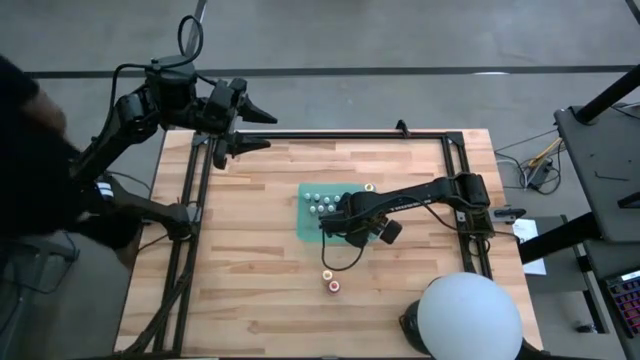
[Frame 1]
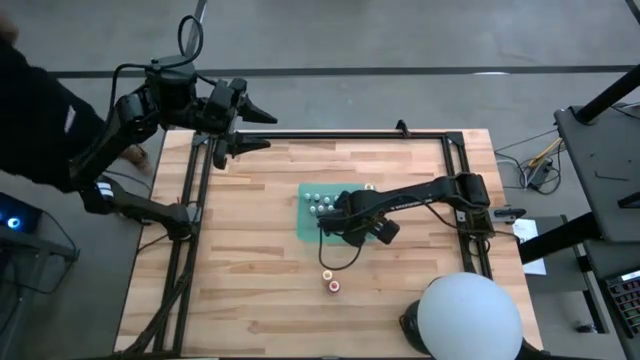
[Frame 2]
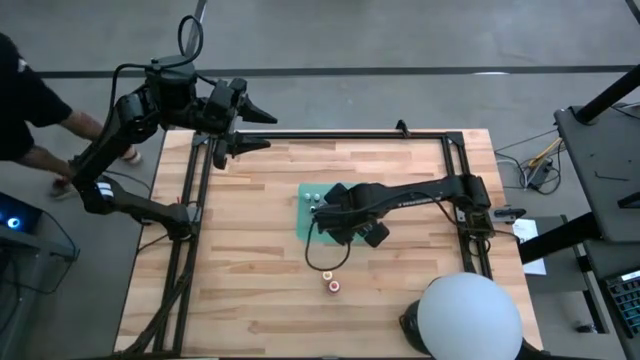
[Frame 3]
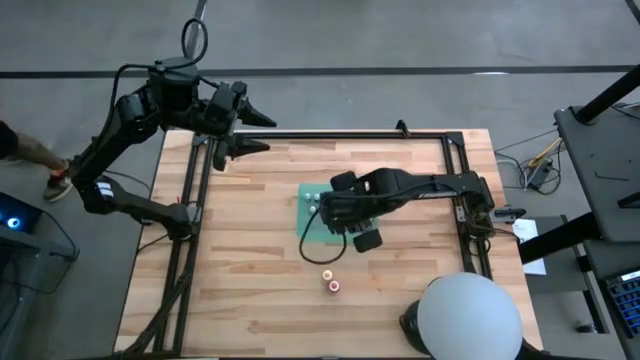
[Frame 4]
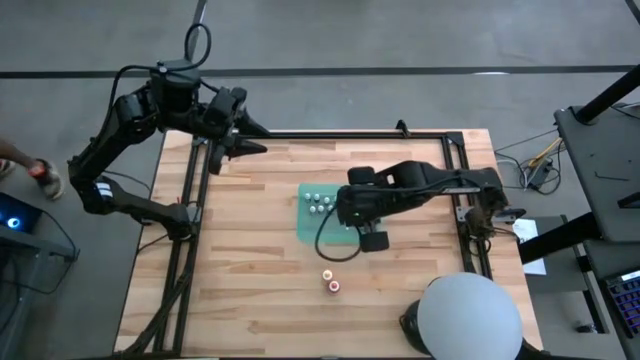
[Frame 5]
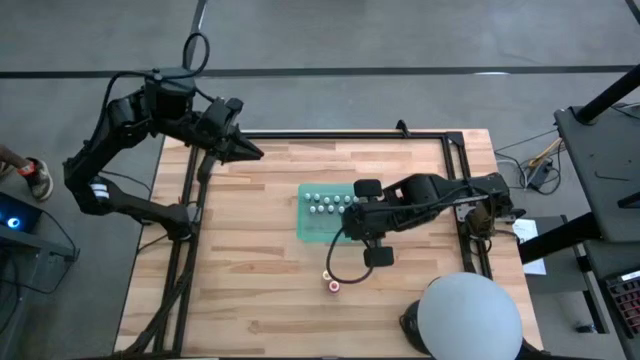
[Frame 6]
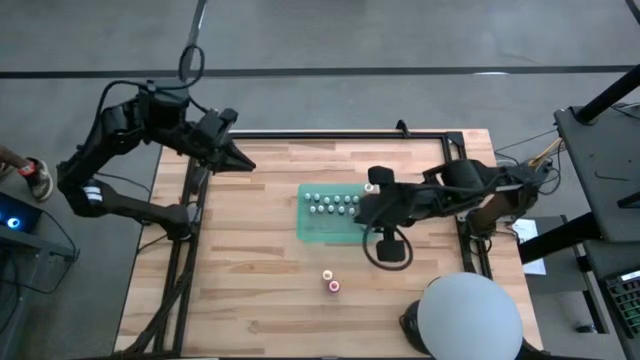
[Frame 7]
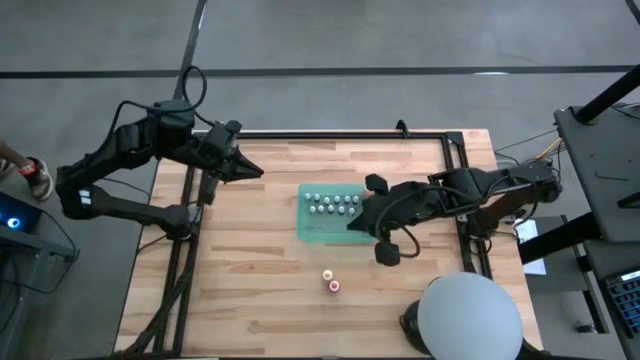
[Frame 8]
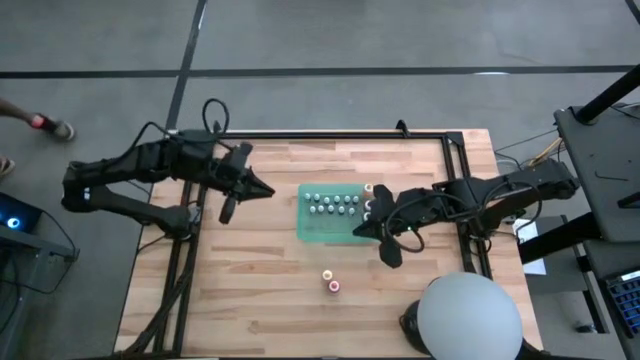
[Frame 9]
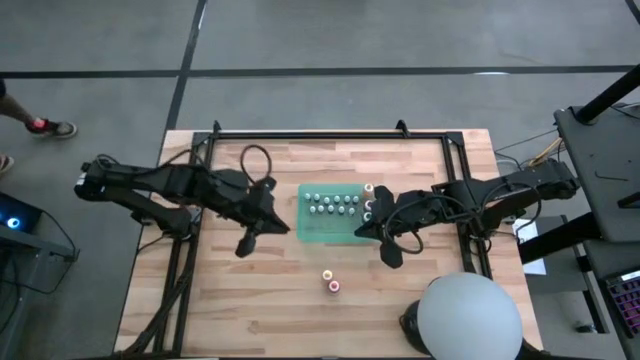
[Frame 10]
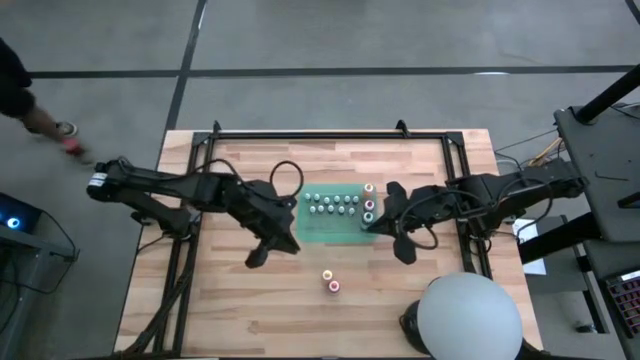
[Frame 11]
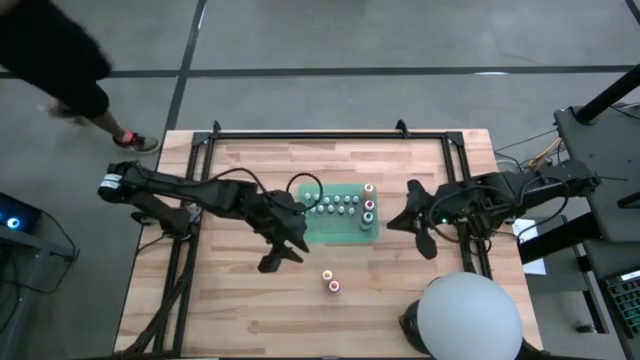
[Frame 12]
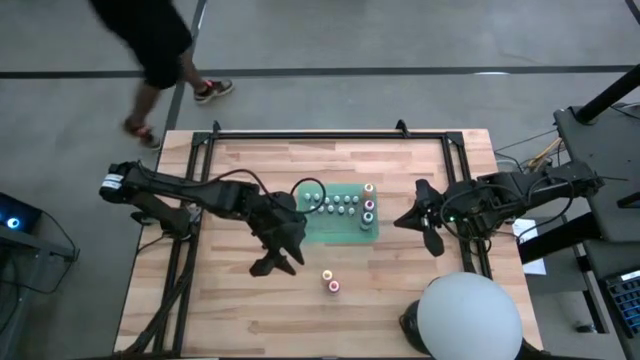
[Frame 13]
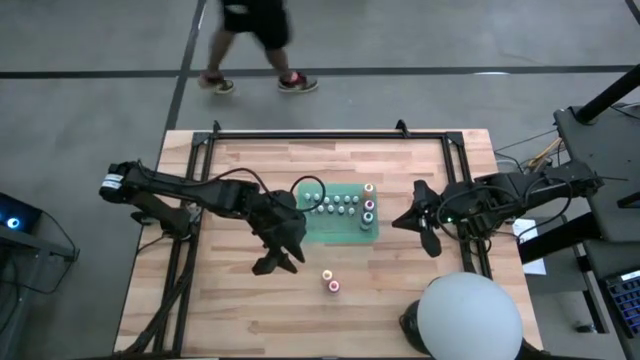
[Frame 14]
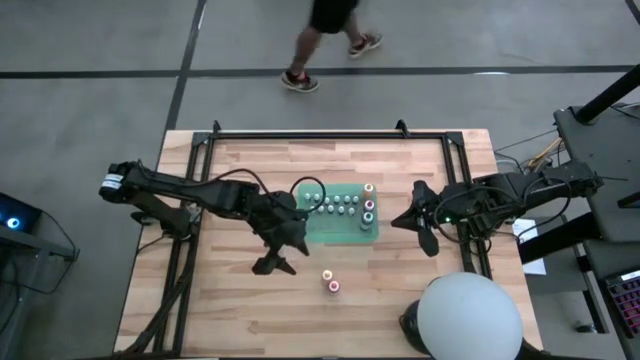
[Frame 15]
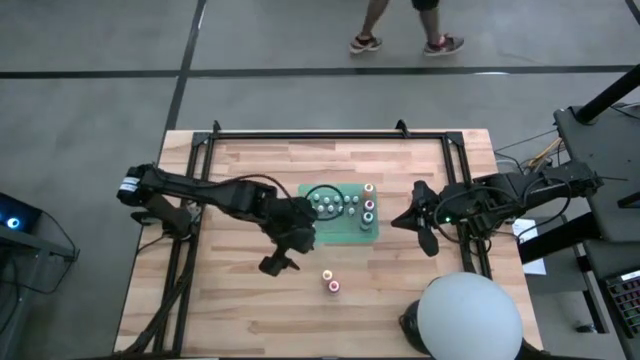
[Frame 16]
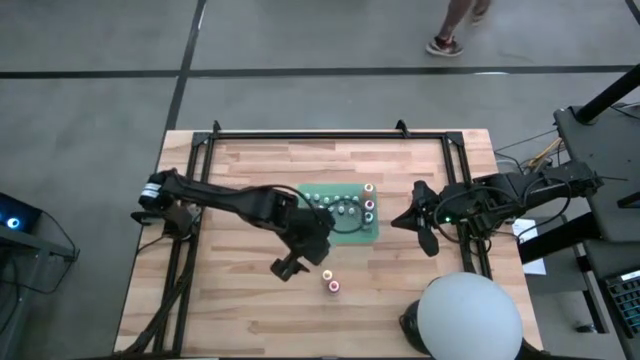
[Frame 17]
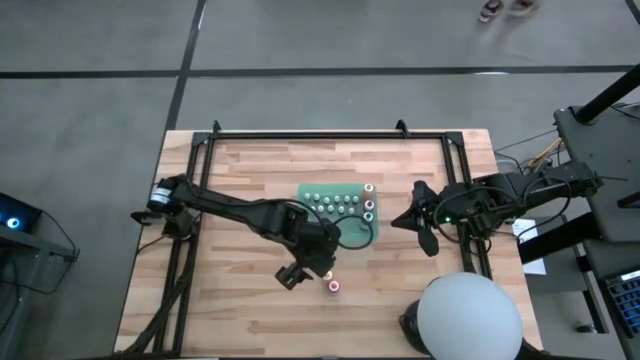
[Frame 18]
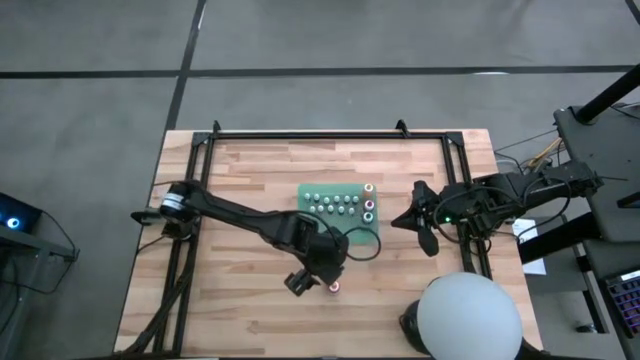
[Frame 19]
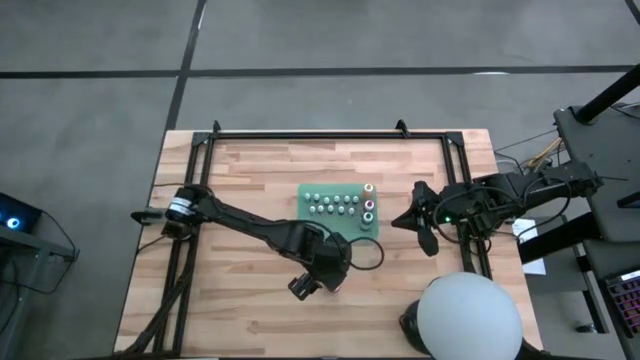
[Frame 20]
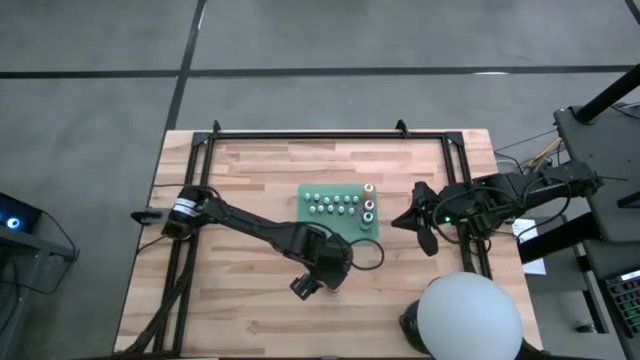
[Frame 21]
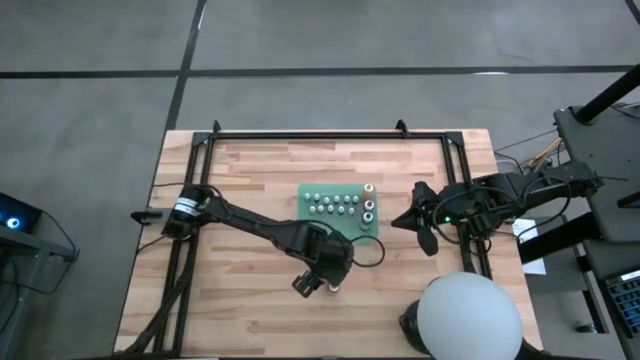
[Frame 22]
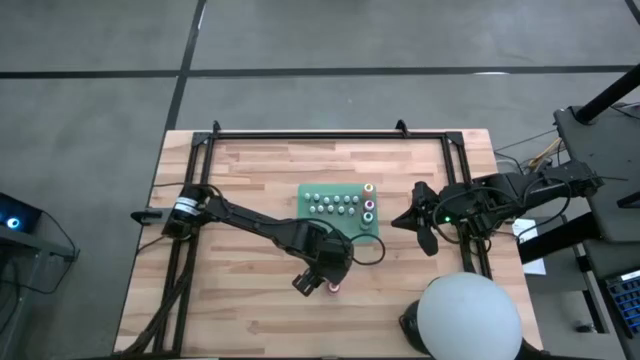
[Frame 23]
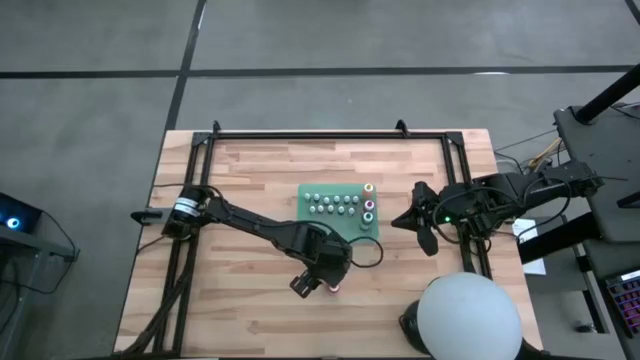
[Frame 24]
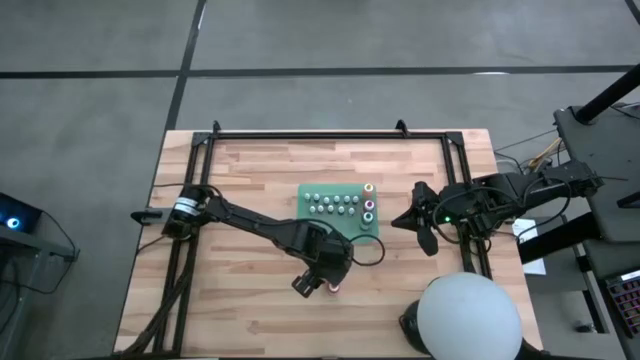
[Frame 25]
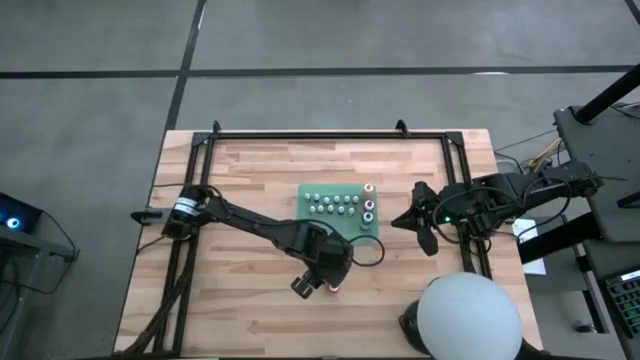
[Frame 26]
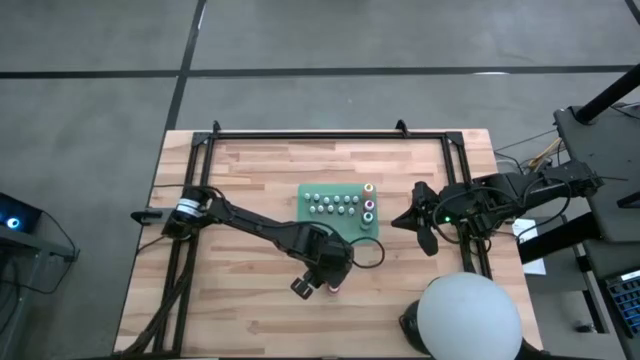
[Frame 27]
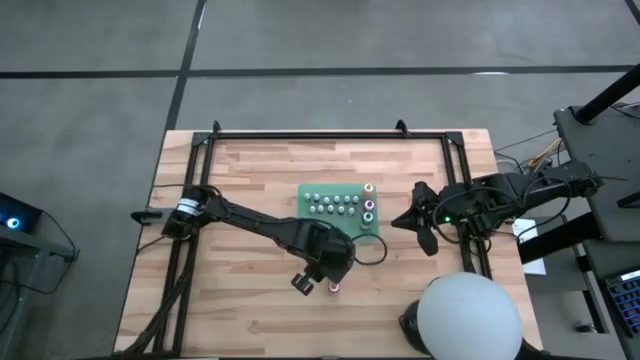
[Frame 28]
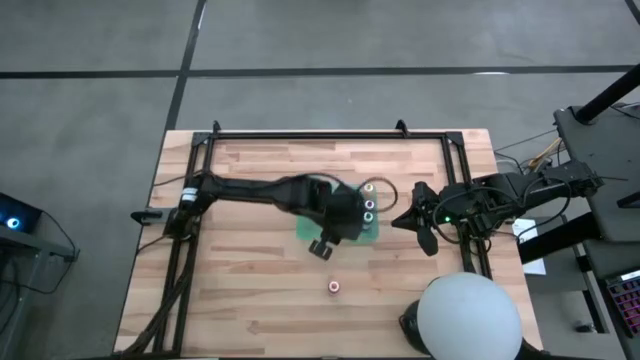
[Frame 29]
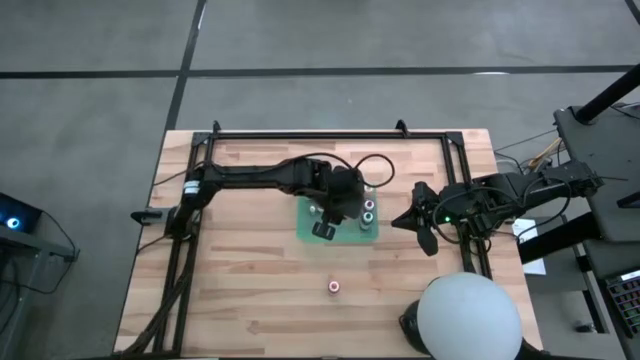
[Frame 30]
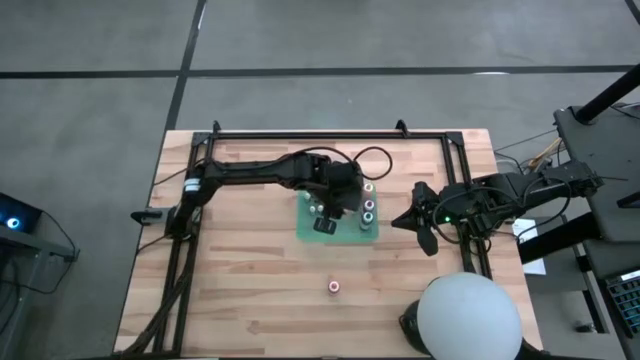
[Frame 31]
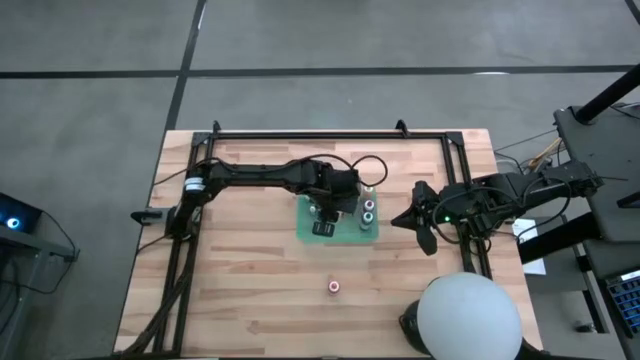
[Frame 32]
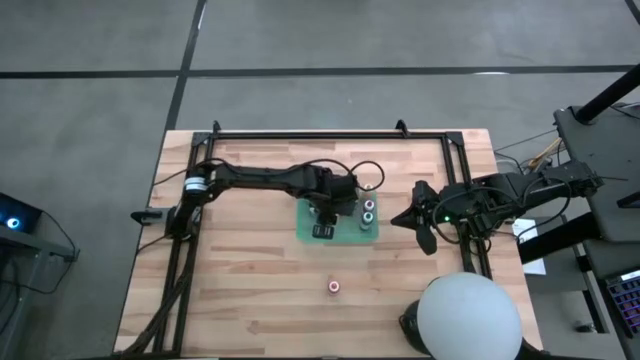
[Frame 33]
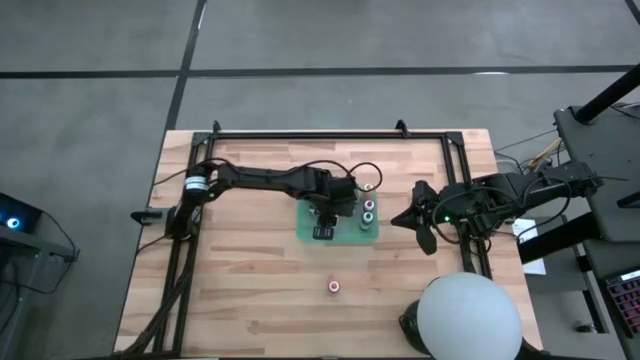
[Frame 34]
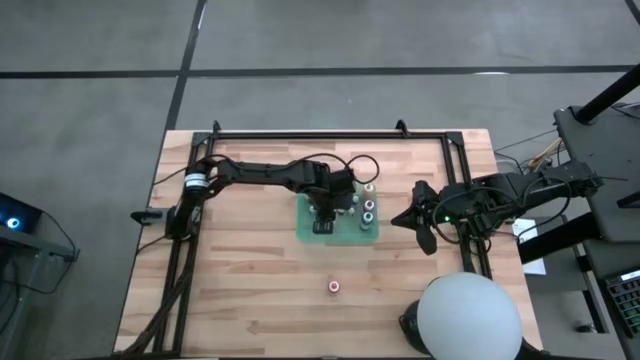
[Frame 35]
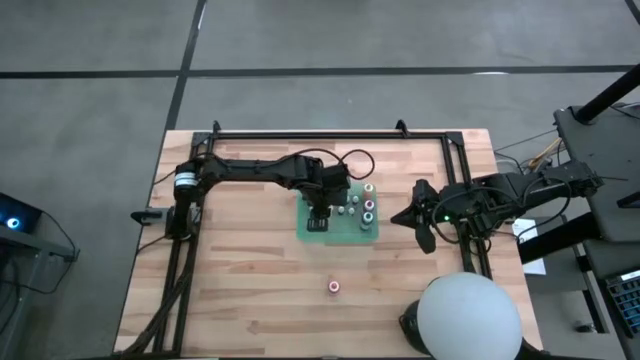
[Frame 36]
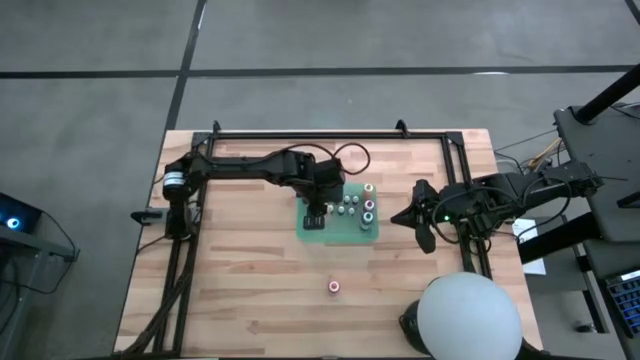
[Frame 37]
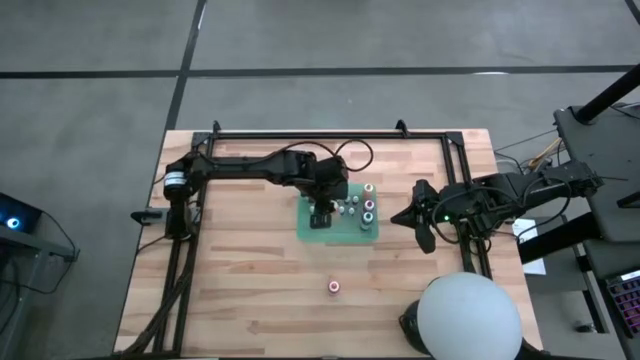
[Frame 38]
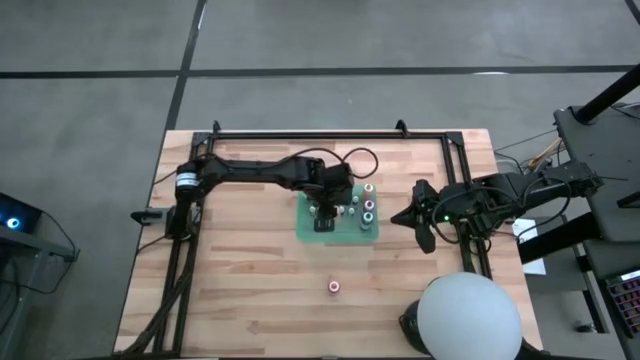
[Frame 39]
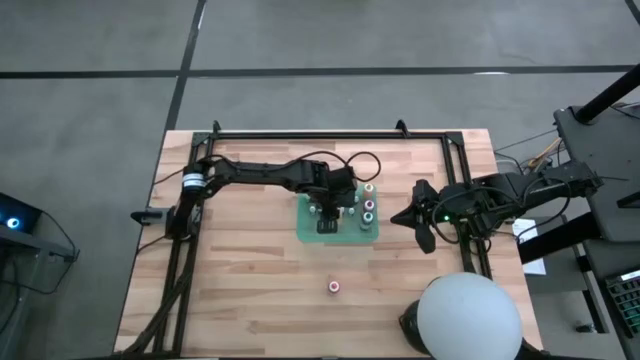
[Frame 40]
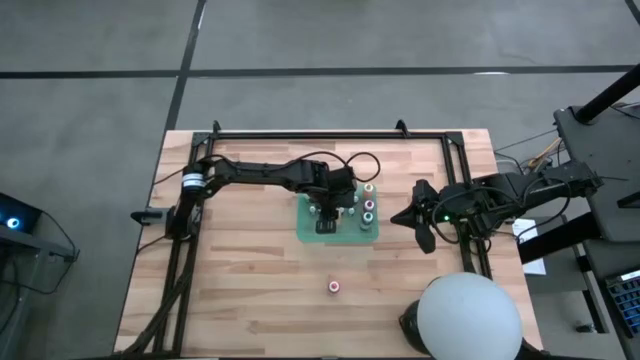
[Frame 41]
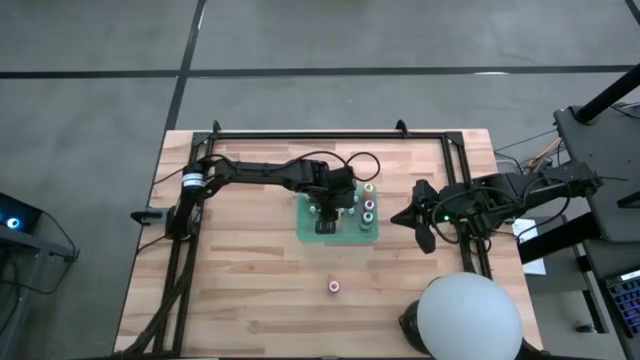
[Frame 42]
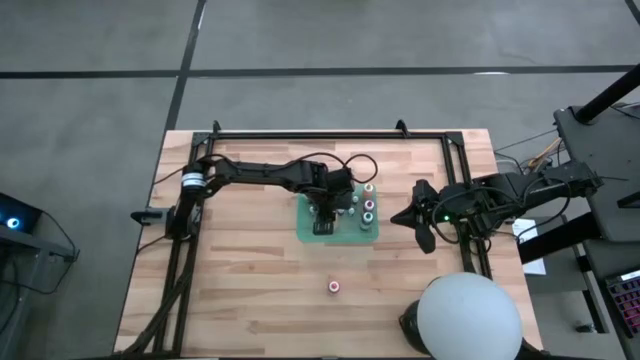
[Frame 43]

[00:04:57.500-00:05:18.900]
Task: Pick & Place food coloring
Put the big yellow food coloring bottle into the green container

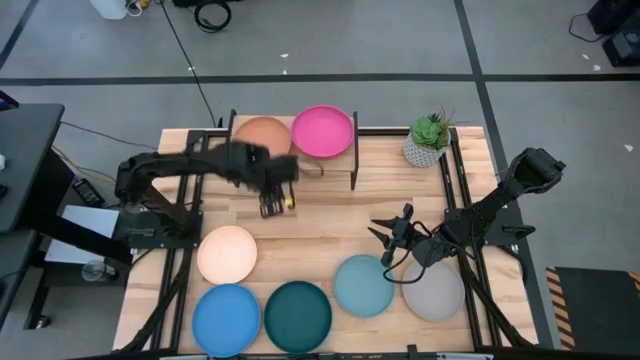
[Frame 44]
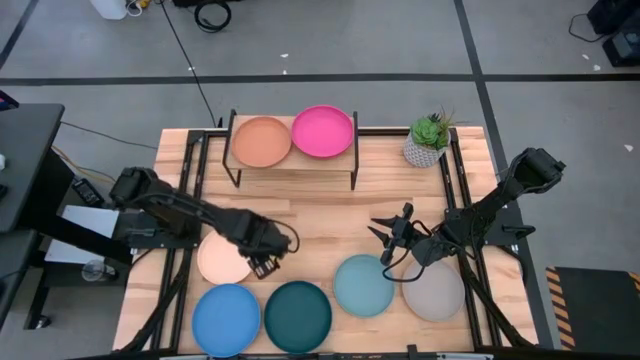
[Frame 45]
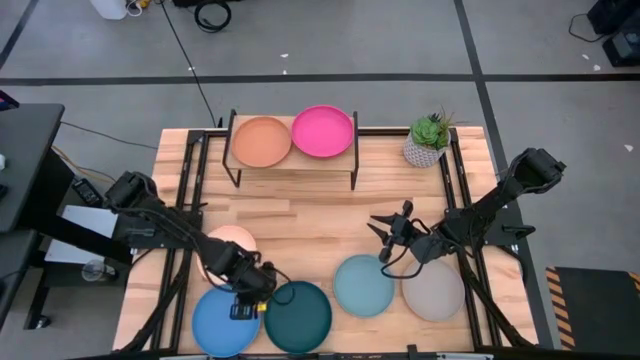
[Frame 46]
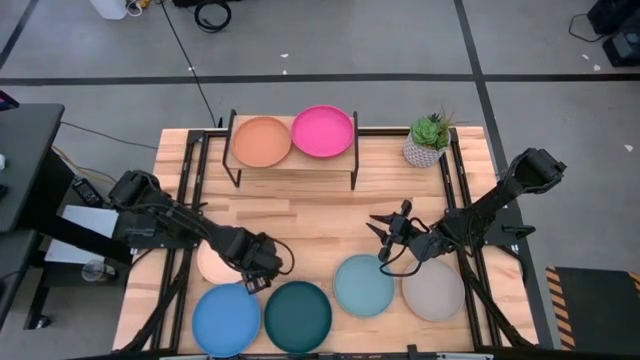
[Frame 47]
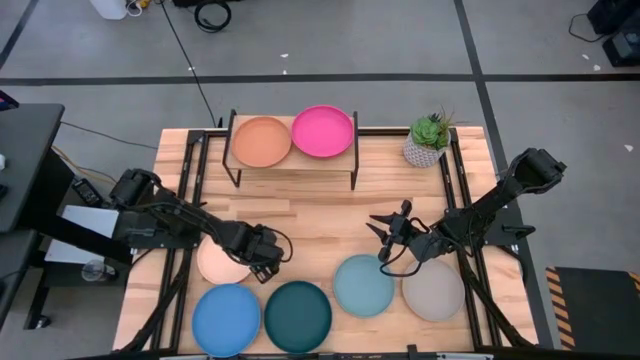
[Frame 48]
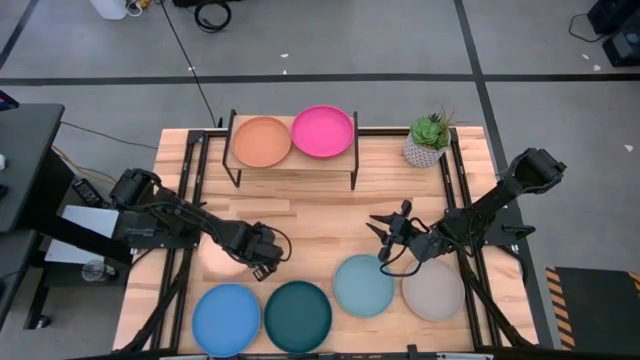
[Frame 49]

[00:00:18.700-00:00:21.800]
Task: Place and stack plates onto a shelf
Stack the light orange plate on top of the brown plate on the shelf
